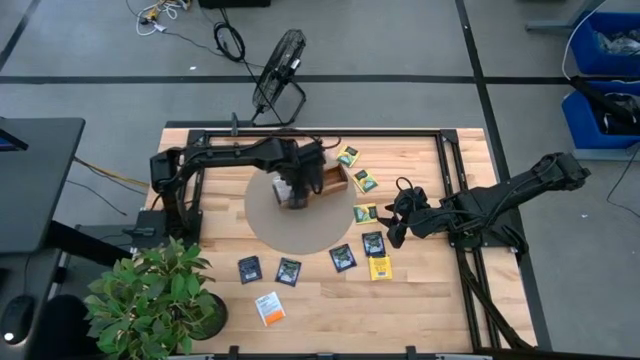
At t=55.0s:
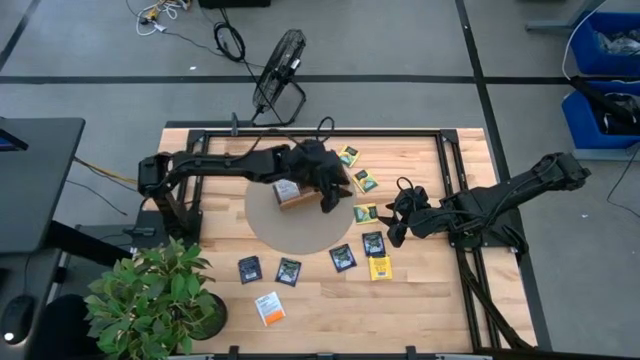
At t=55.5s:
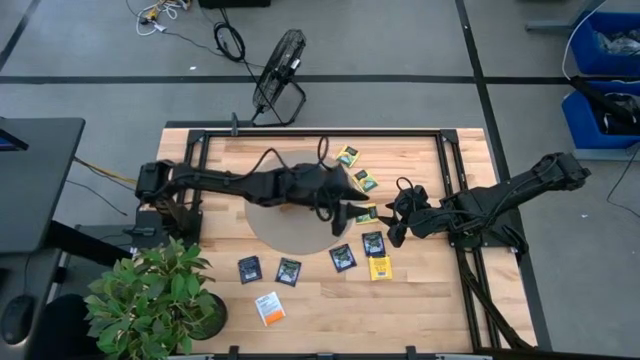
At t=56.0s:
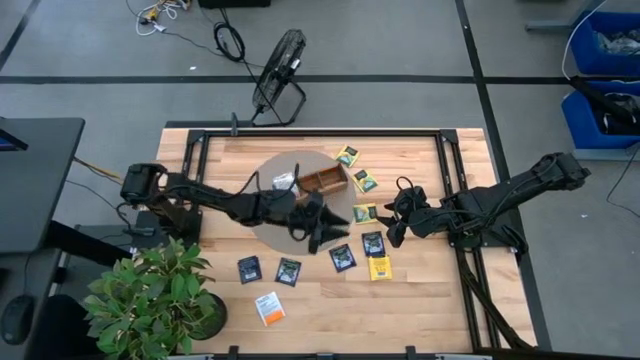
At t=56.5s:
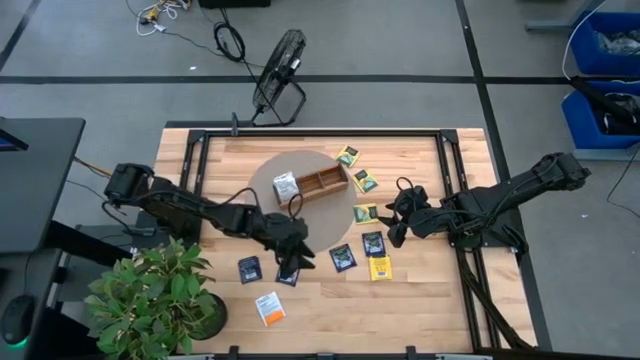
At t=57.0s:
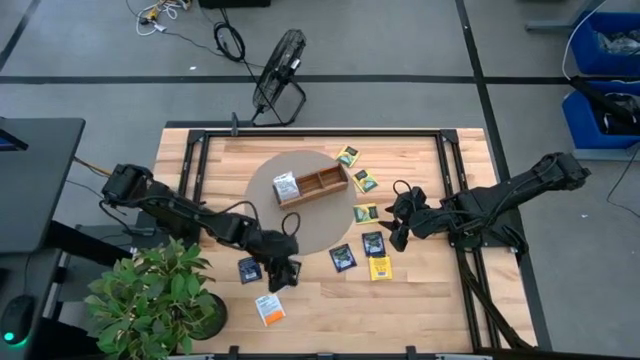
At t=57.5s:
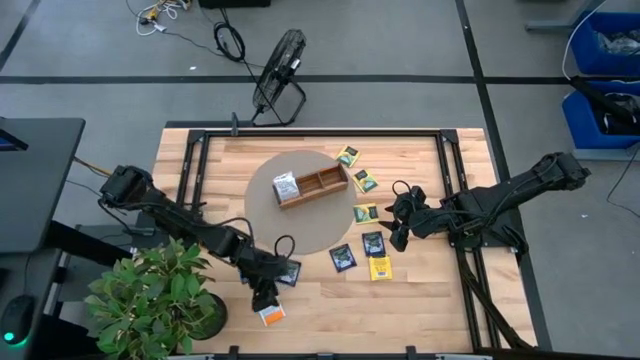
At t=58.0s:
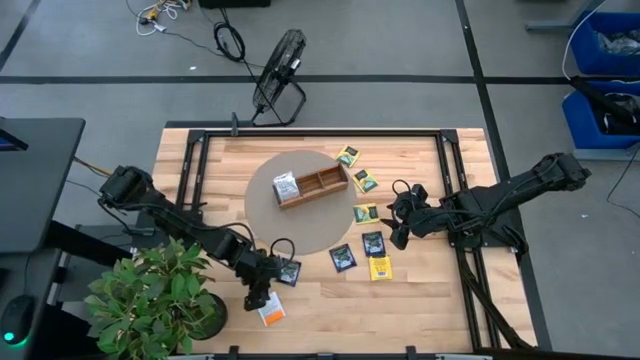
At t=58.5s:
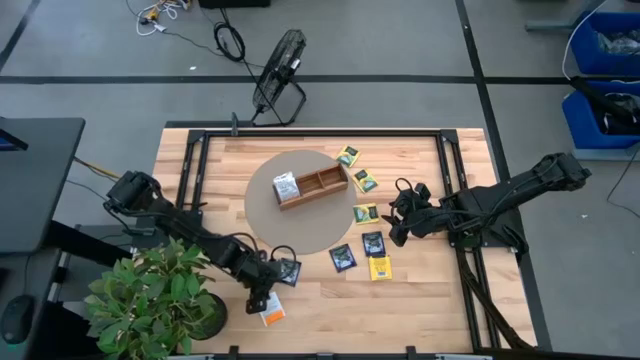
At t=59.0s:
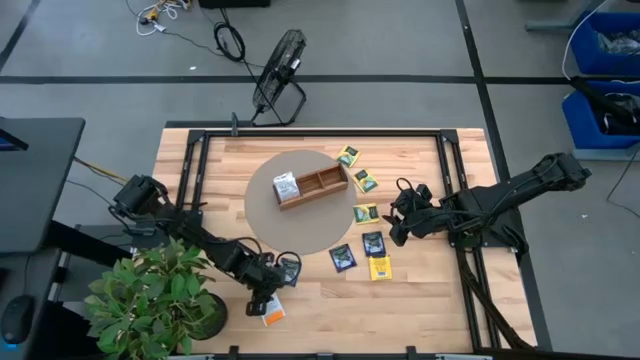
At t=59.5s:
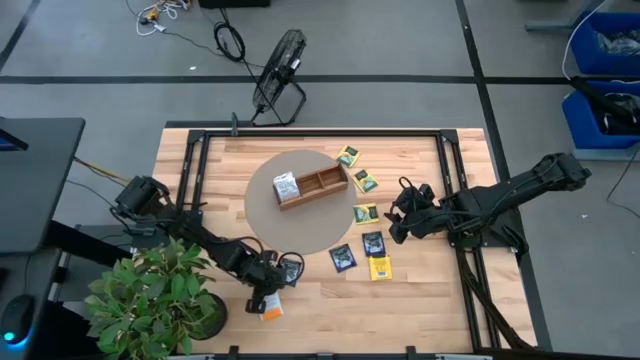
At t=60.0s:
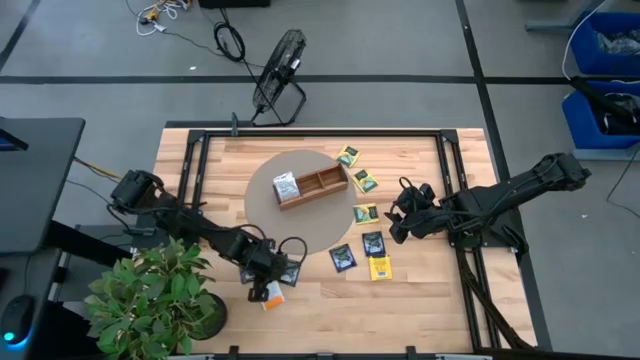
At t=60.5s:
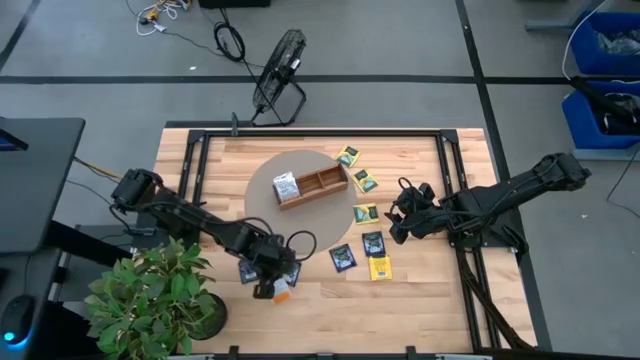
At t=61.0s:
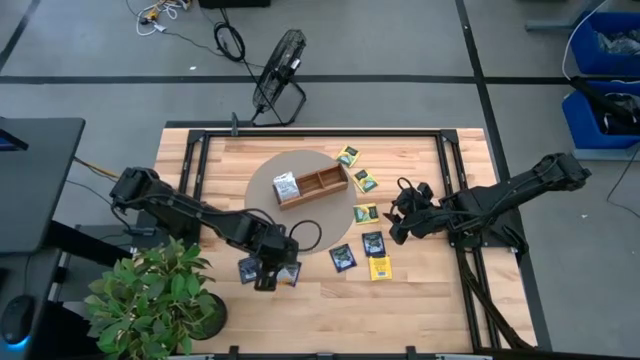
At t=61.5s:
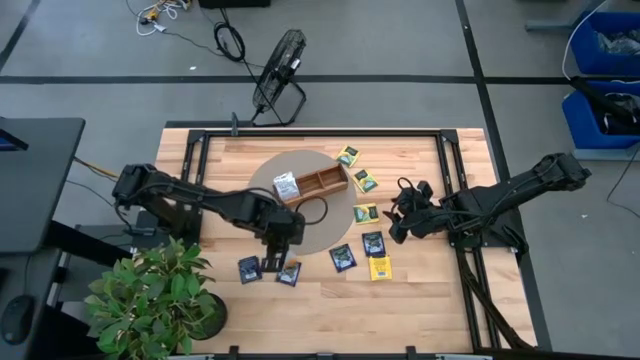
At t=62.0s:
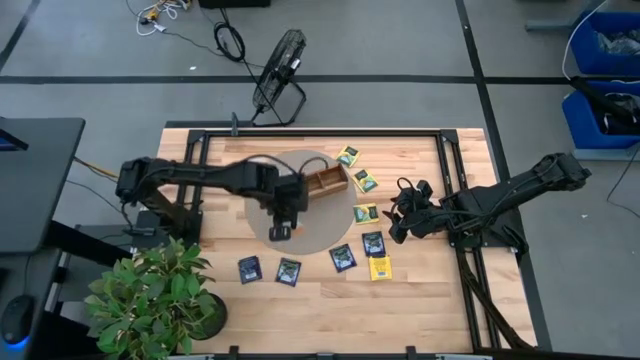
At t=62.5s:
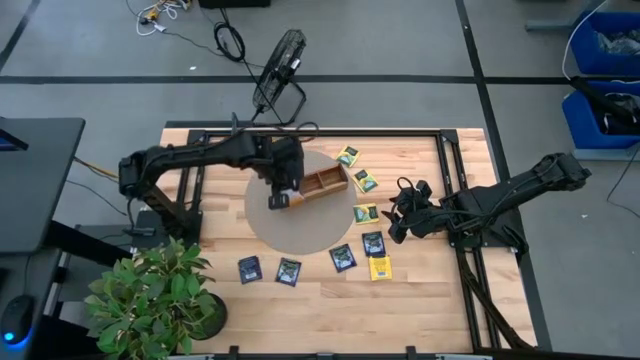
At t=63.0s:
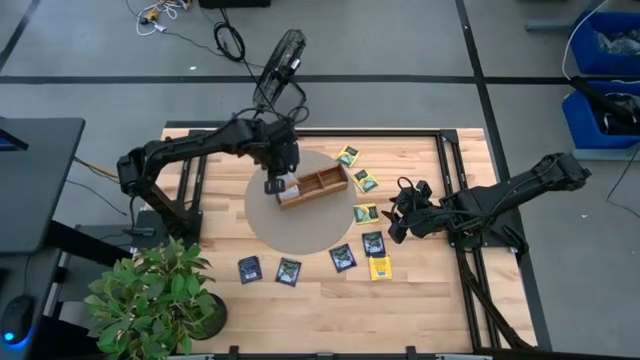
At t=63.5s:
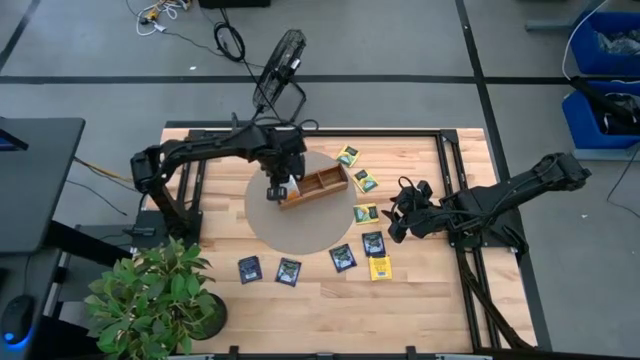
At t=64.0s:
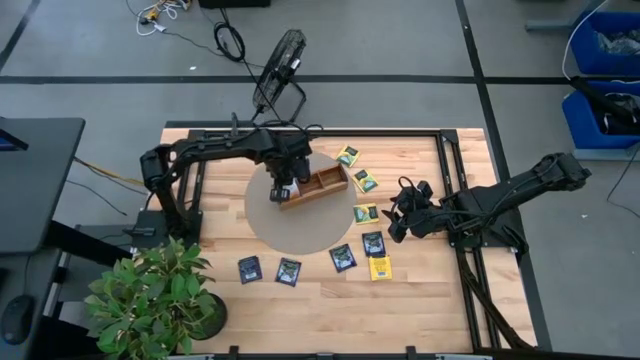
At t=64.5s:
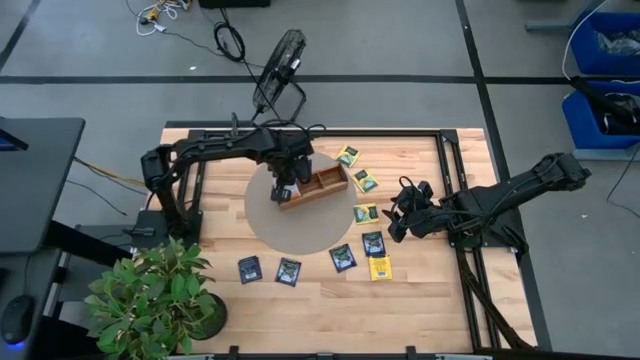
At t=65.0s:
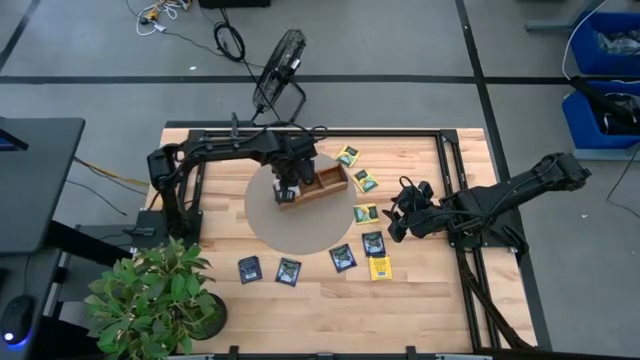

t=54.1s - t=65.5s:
Task: Pick & Place Tea
Put the white tea bag into the left section of the wooden organizer

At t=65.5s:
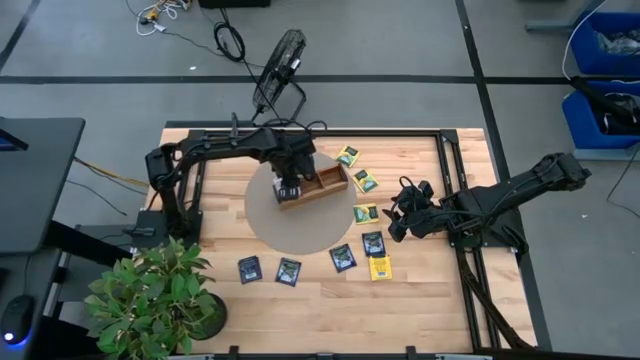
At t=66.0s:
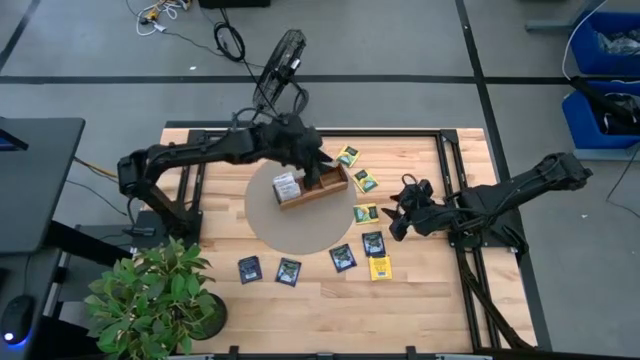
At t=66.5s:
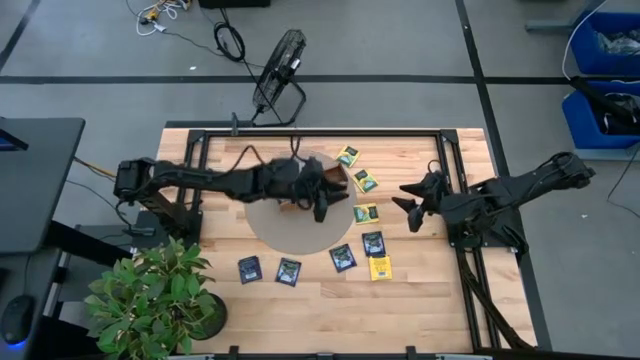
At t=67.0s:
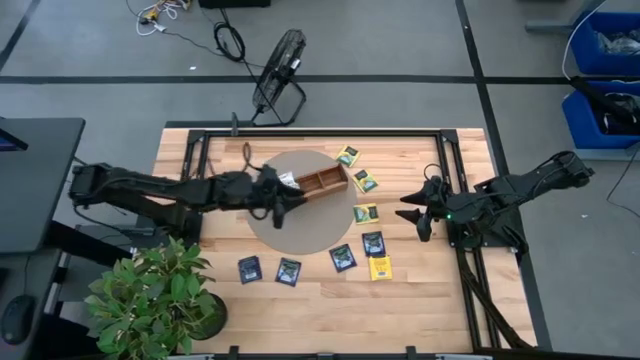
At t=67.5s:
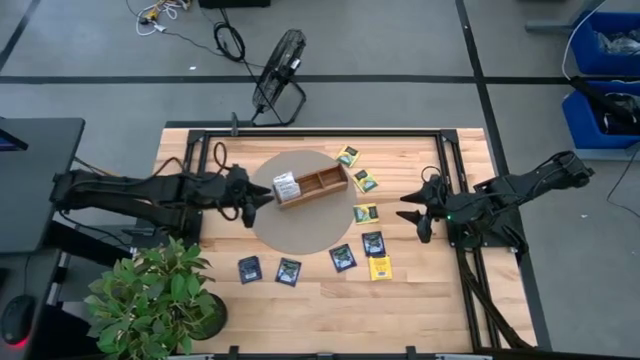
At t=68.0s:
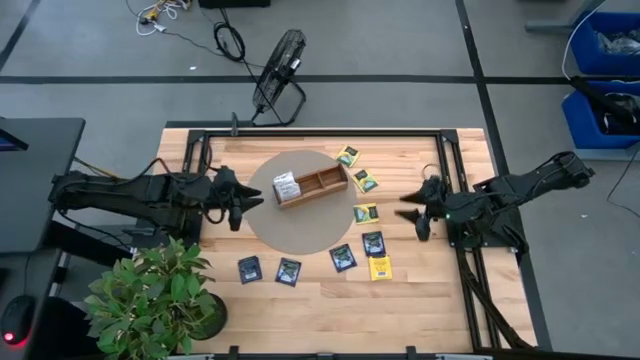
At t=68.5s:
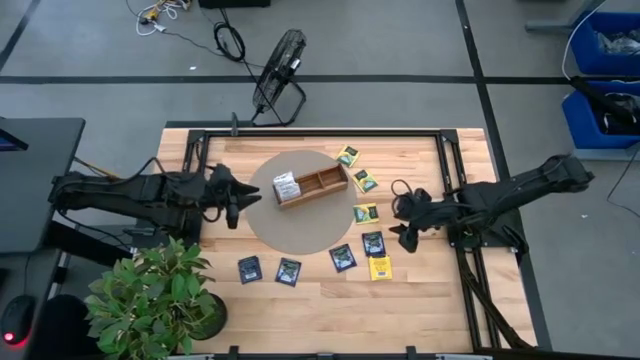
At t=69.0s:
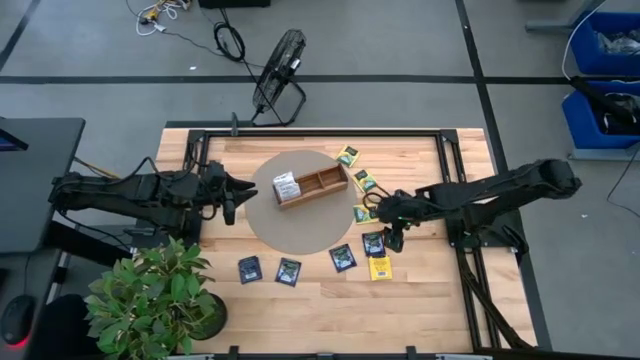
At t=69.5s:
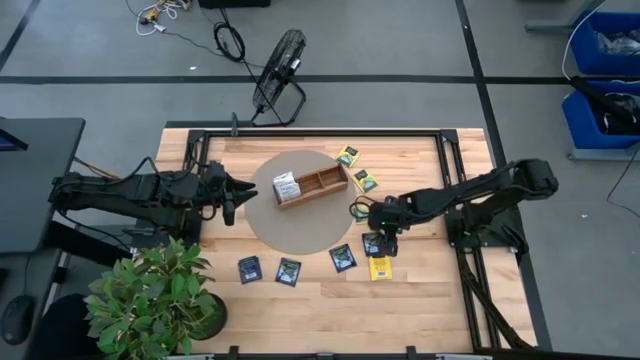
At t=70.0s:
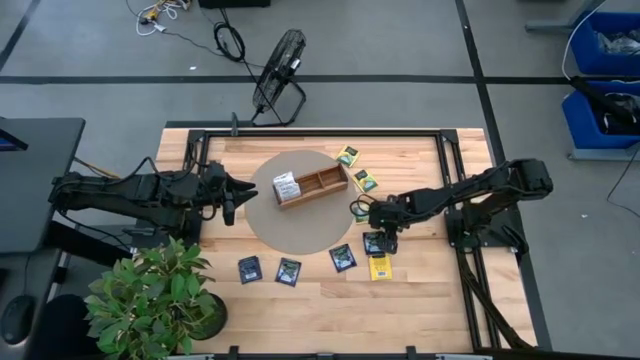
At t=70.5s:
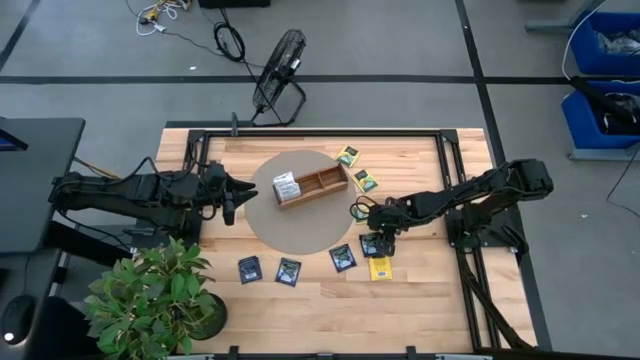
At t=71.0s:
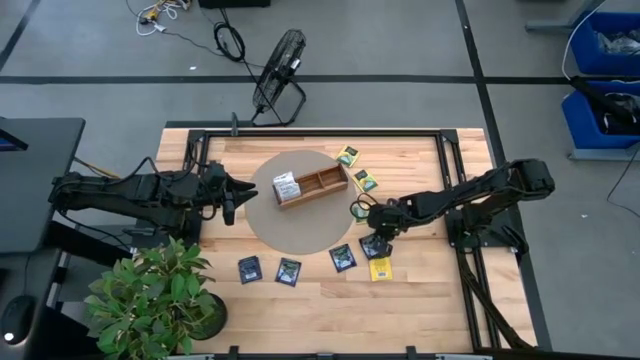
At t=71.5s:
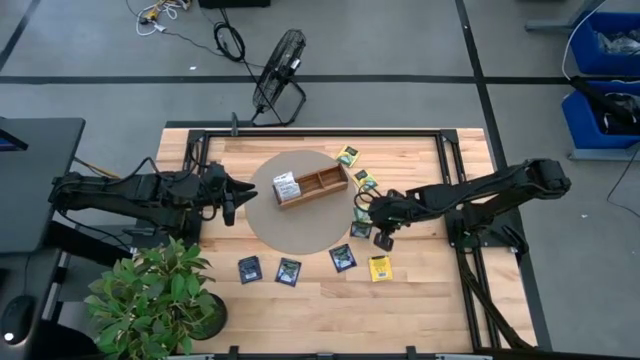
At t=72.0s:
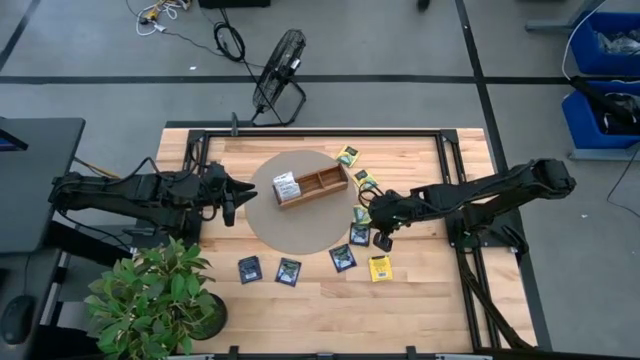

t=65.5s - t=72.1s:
Put the purple tea bag into the right section of the wooden organizer

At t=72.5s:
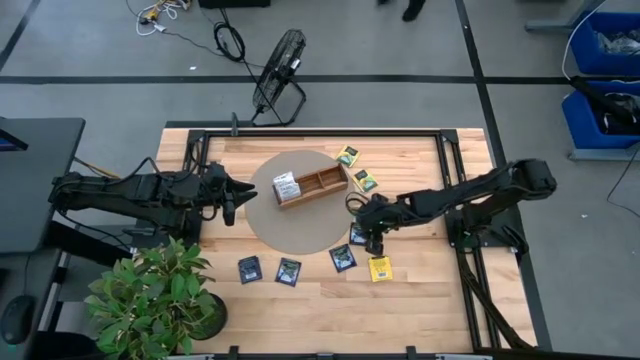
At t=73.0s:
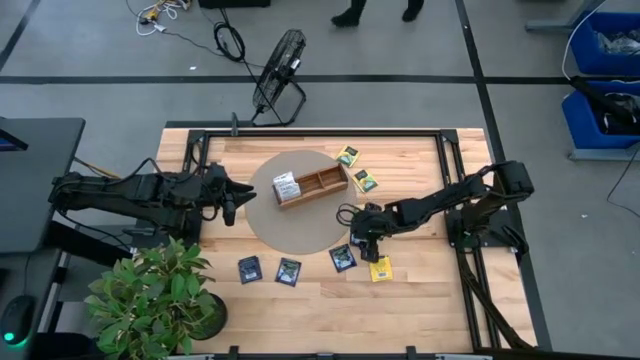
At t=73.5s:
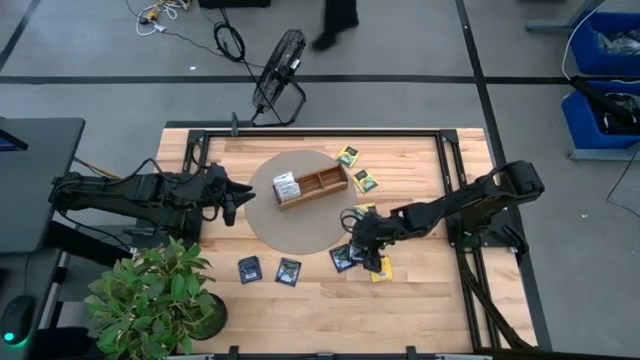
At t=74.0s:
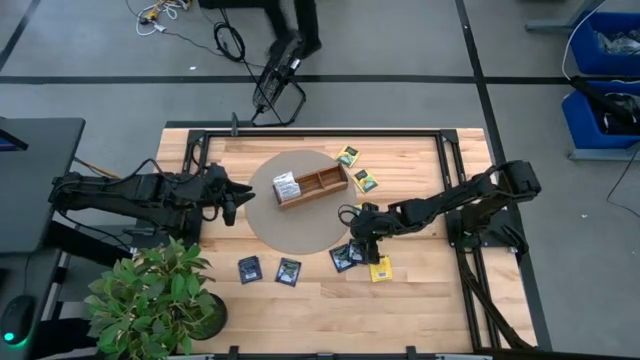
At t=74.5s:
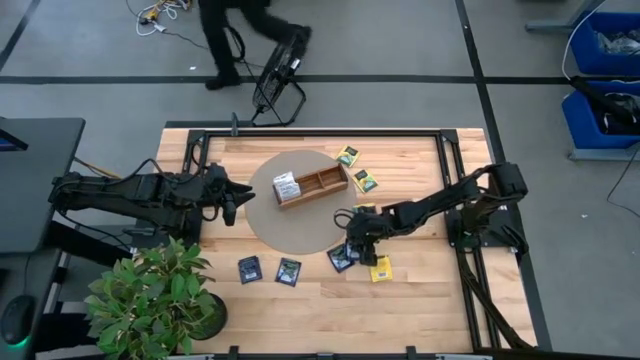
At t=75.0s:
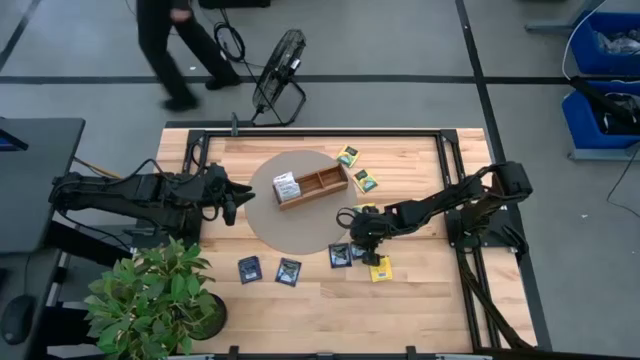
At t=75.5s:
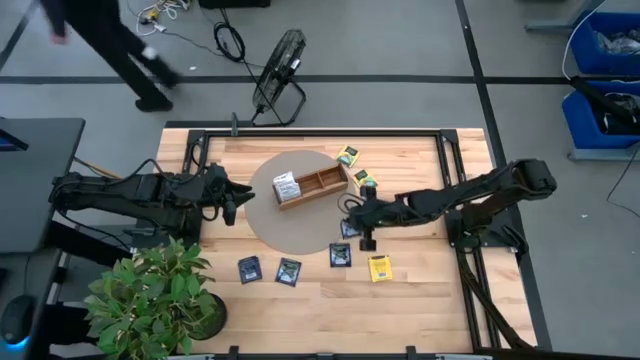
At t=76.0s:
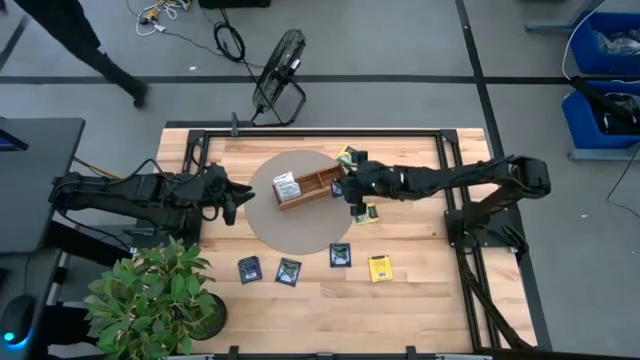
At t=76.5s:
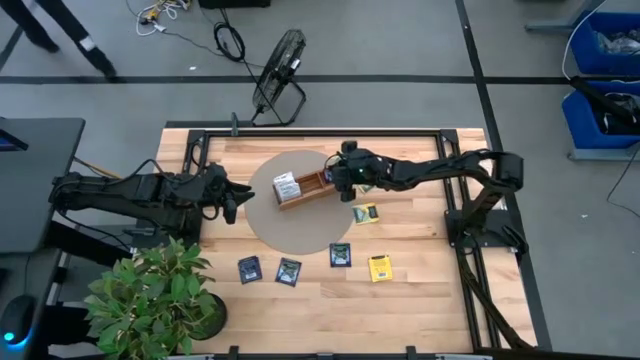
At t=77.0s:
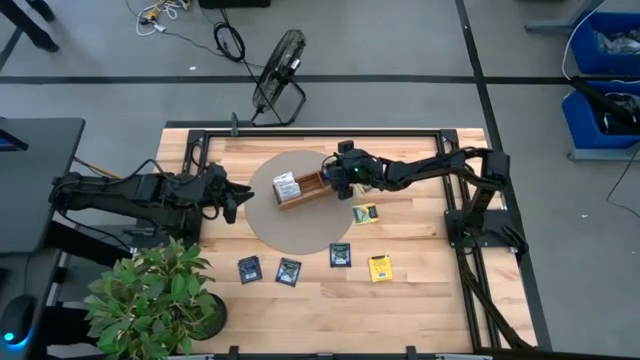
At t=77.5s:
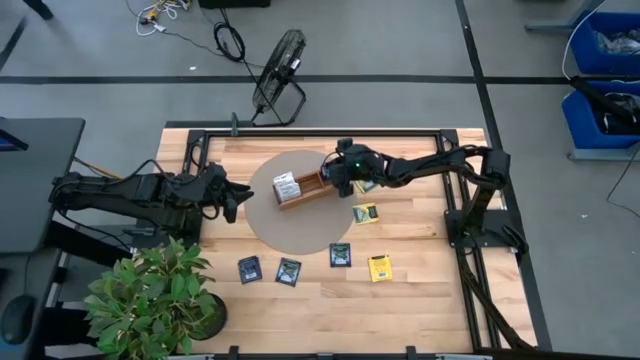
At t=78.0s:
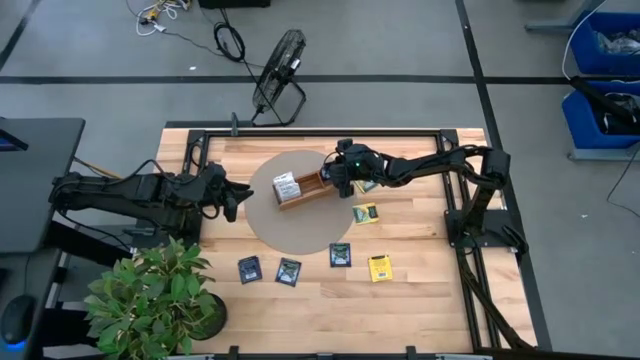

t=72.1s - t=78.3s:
Put the purple tea bag into the right section of the wooden organizer
